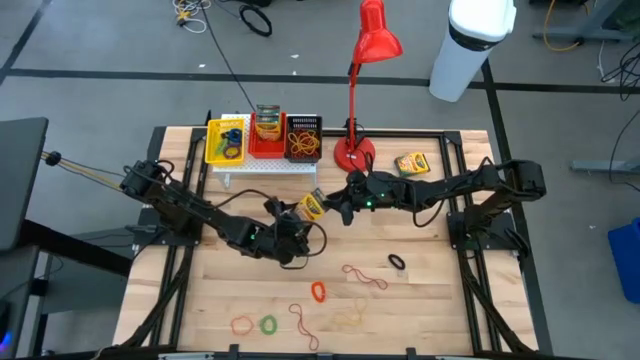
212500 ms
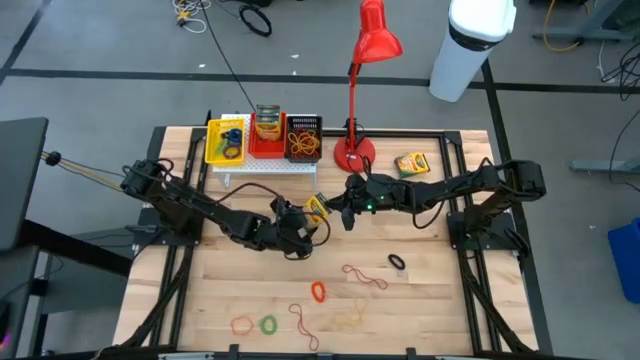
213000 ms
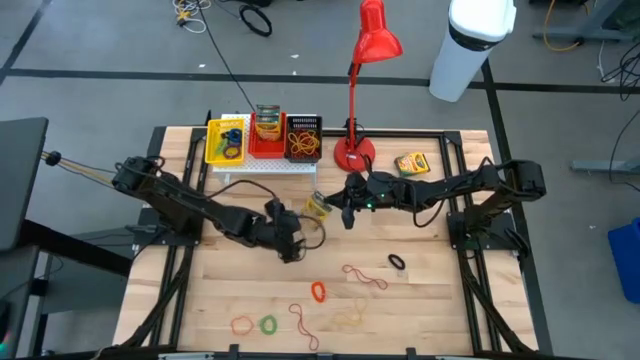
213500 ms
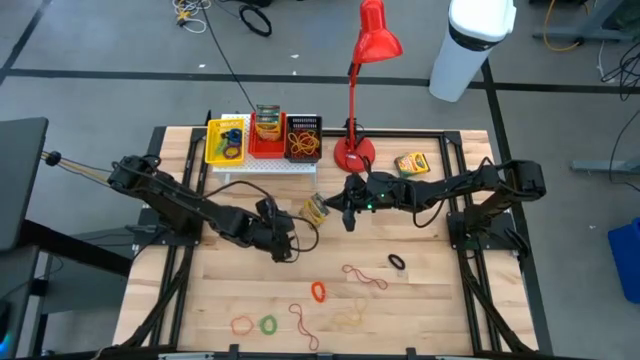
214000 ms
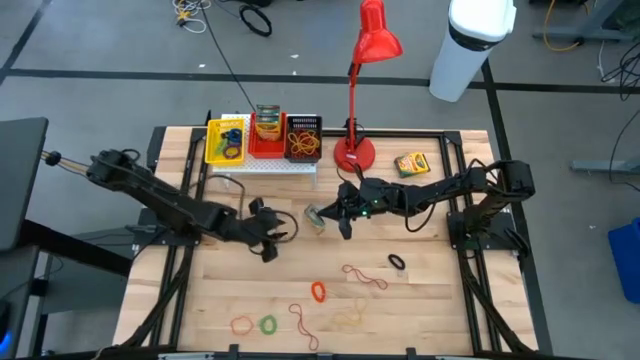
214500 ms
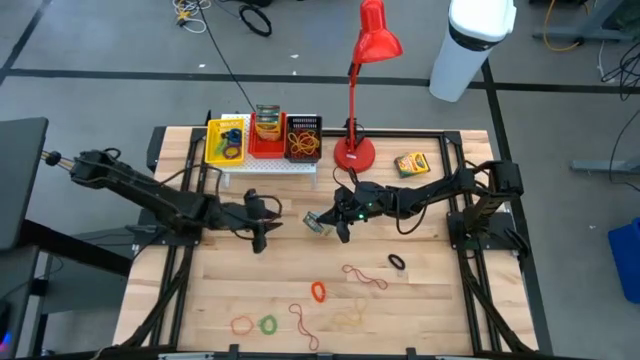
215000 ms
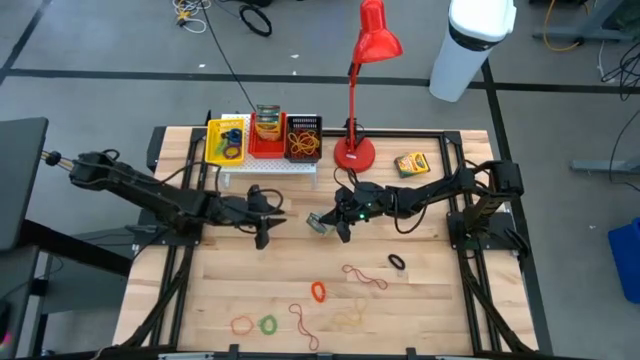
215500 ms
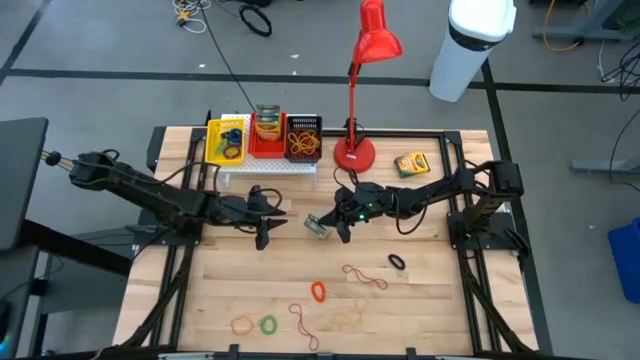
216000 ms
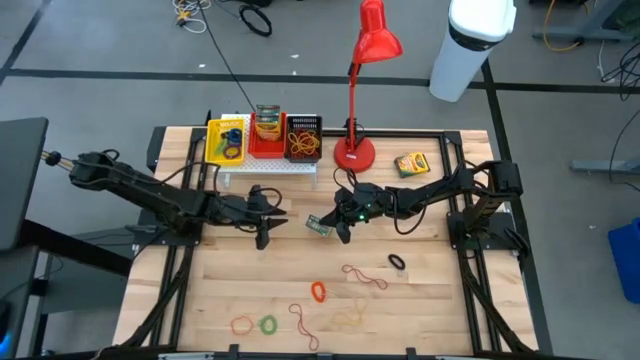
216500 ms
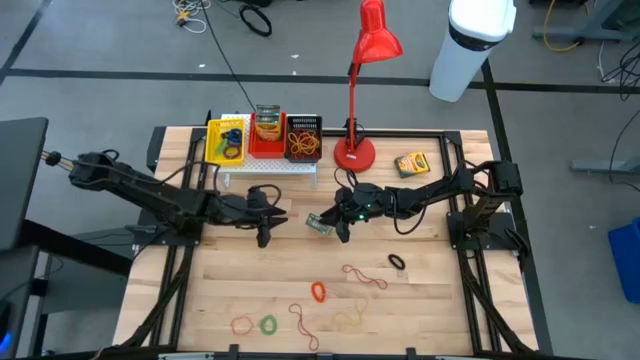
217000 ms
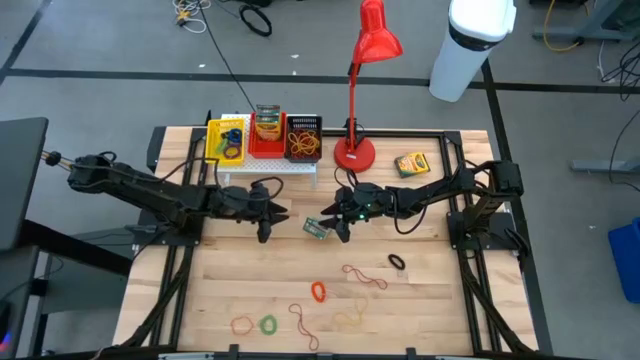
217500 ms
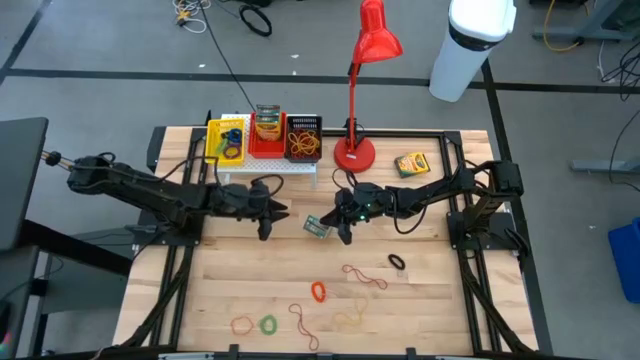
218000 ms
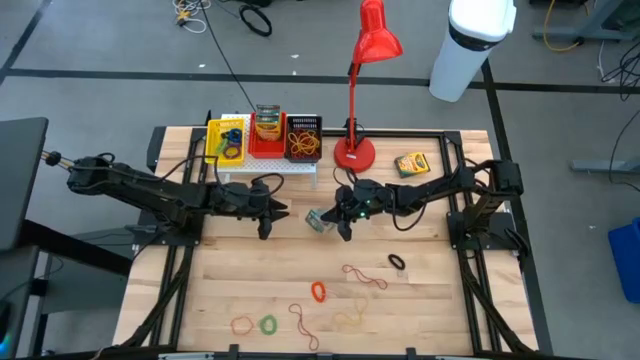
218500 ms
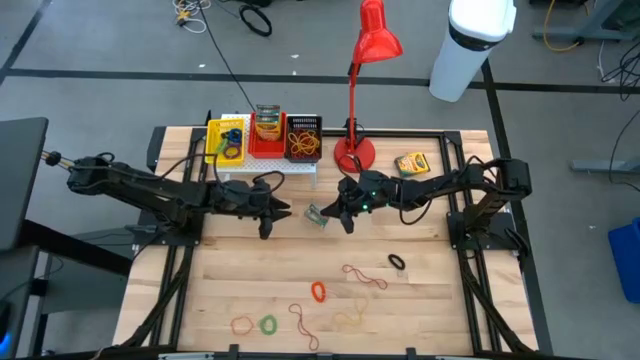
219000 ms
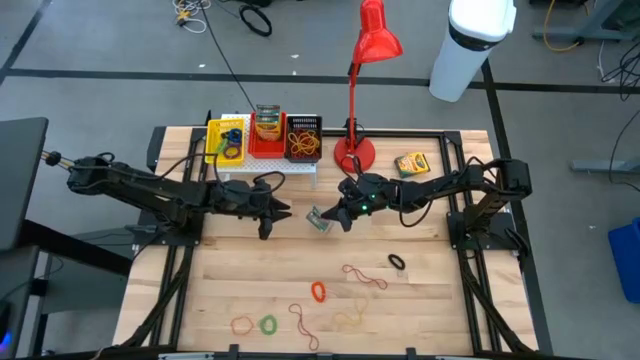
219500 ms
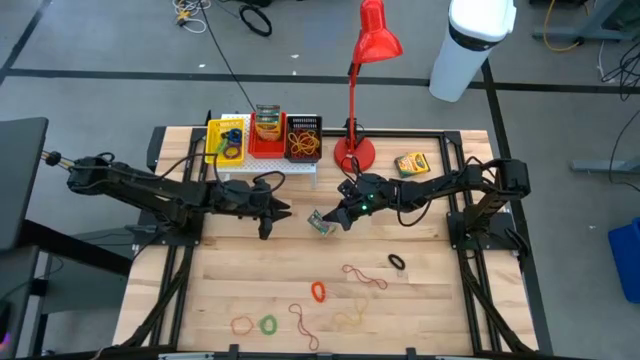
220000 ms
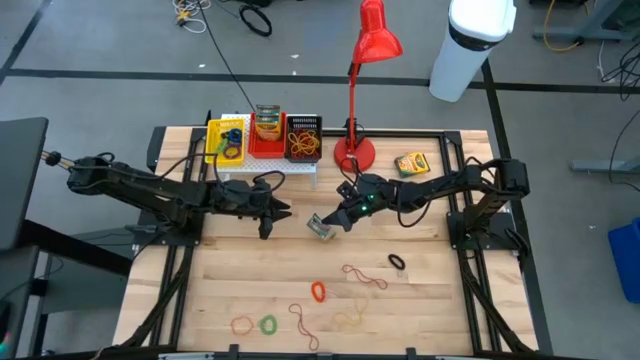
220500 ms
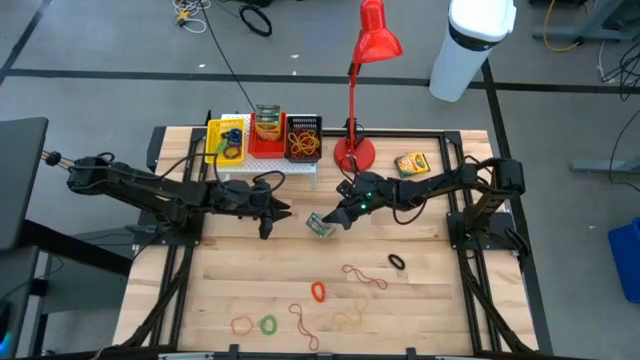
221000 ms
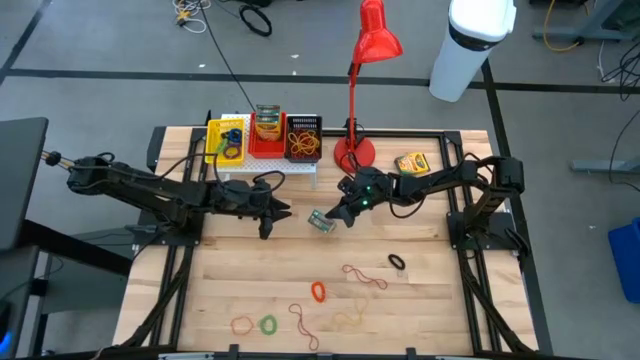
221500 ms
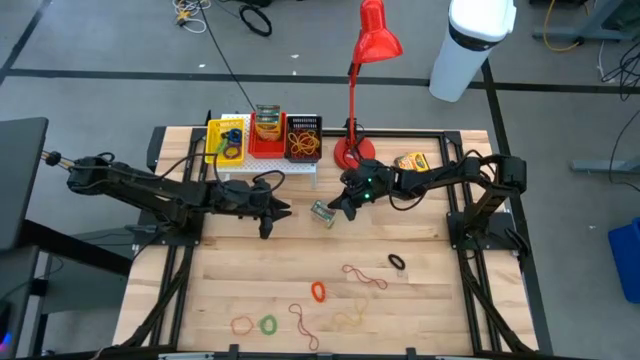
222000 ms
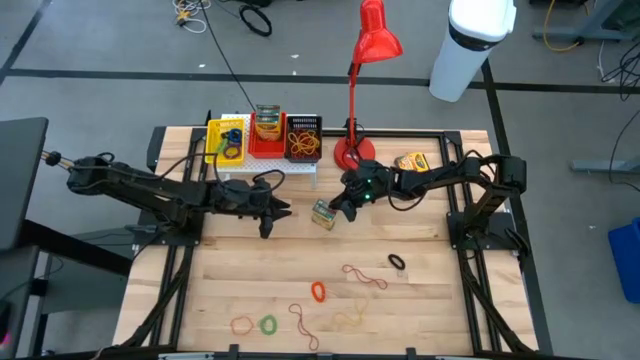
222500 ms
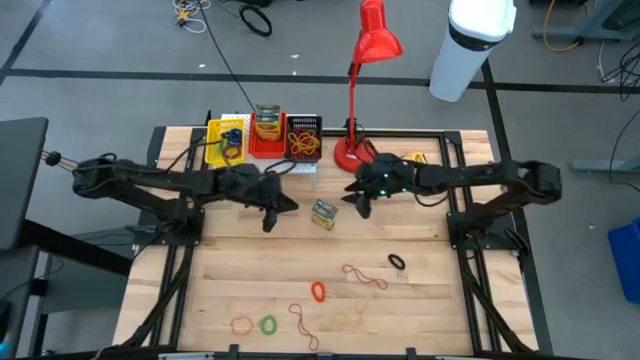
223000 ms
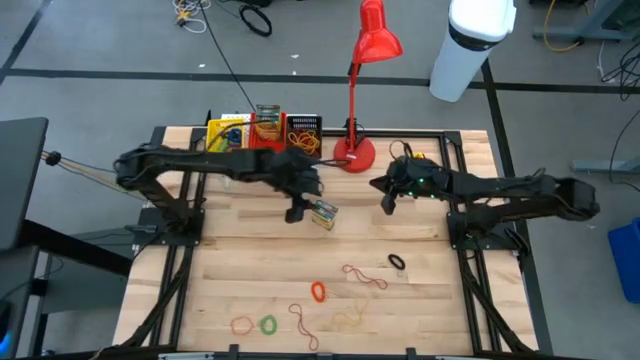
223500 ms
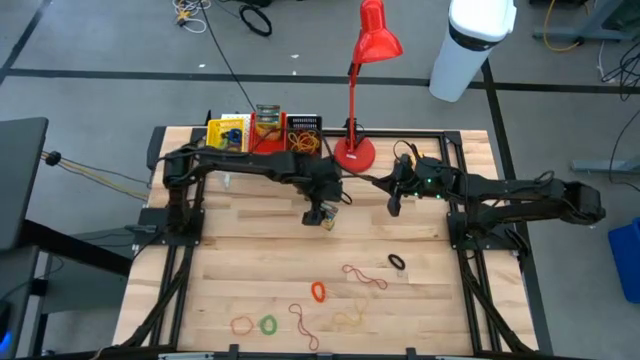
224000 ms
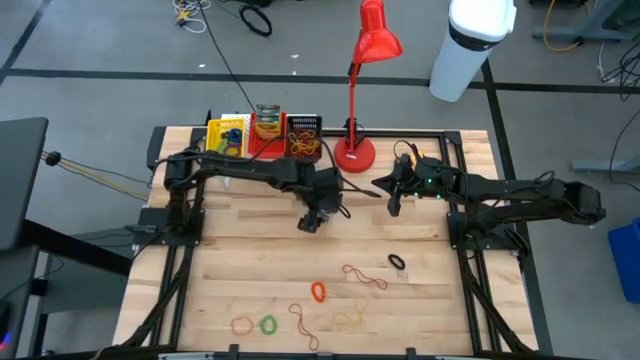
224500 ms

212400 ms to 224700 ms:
Task: Pick & Place Office Desk Supplies
Put the crayon box into the red bin on the shelf

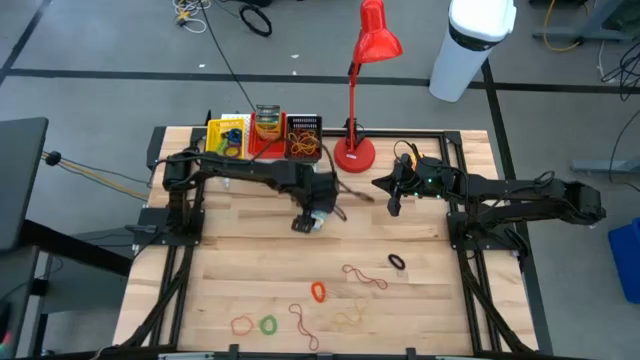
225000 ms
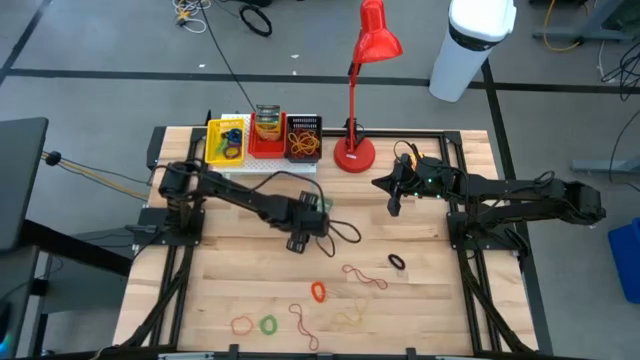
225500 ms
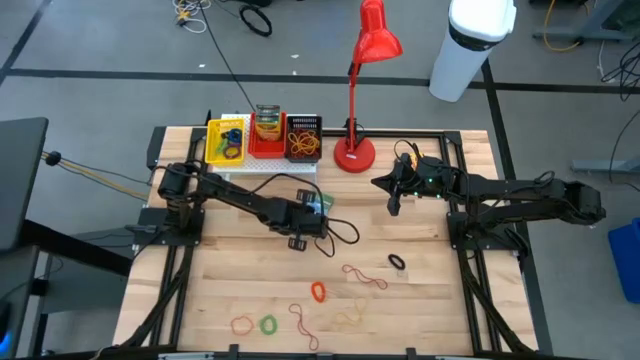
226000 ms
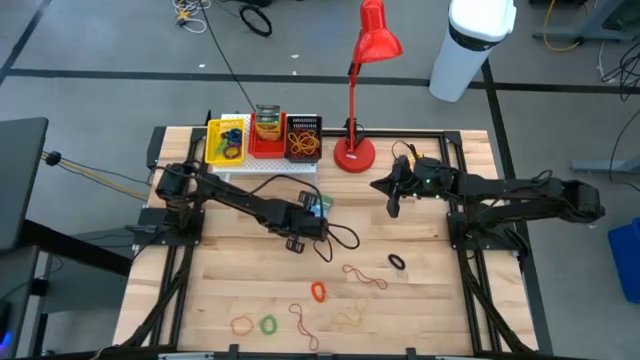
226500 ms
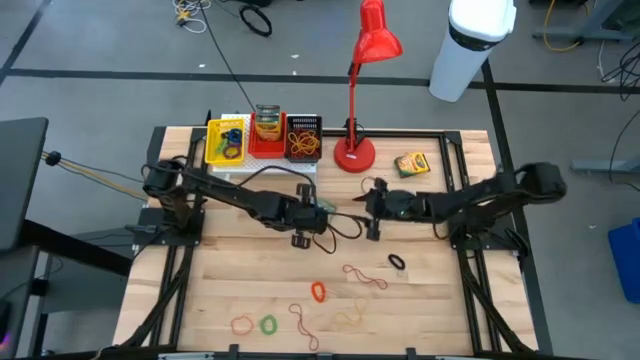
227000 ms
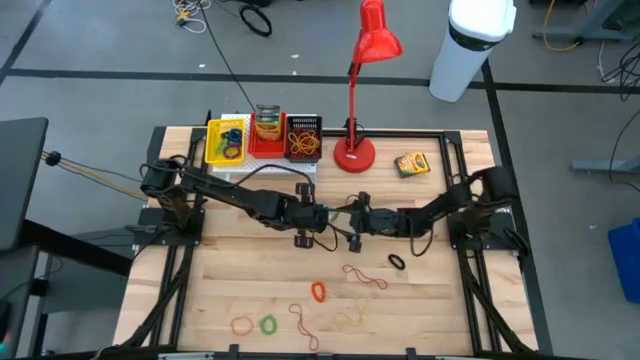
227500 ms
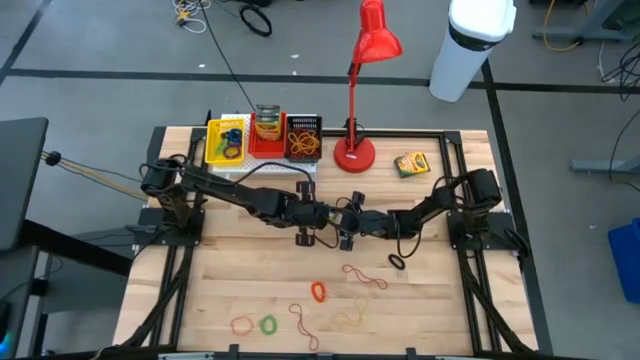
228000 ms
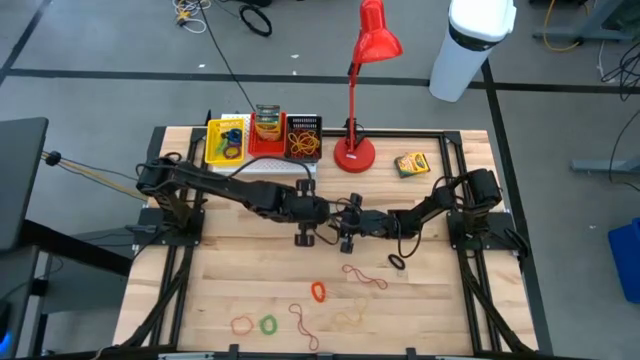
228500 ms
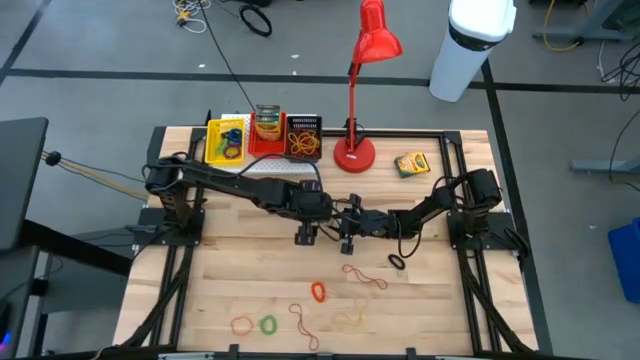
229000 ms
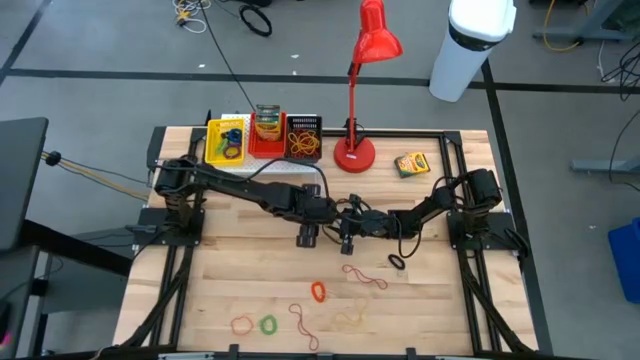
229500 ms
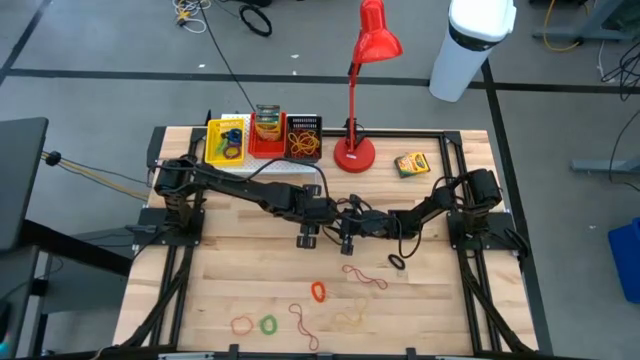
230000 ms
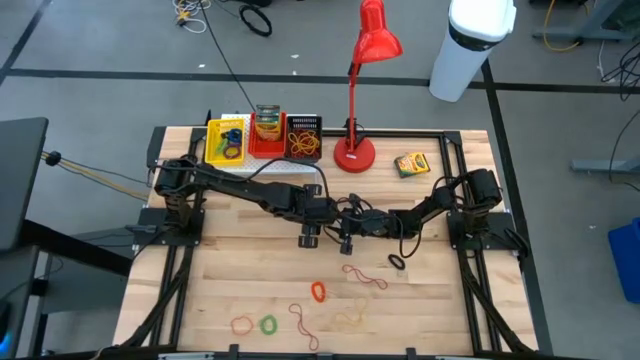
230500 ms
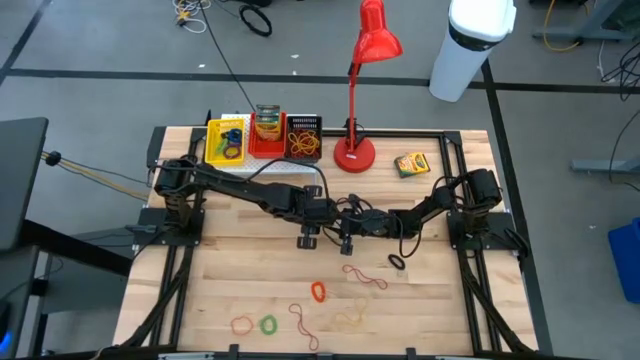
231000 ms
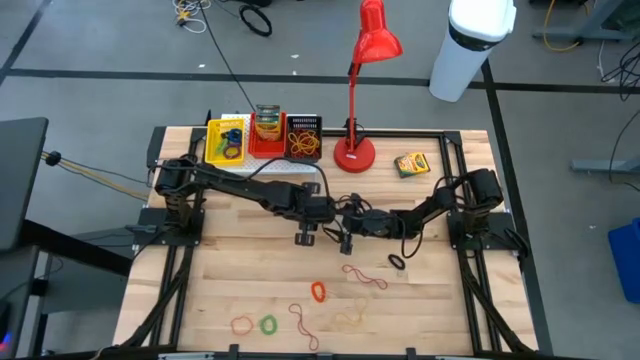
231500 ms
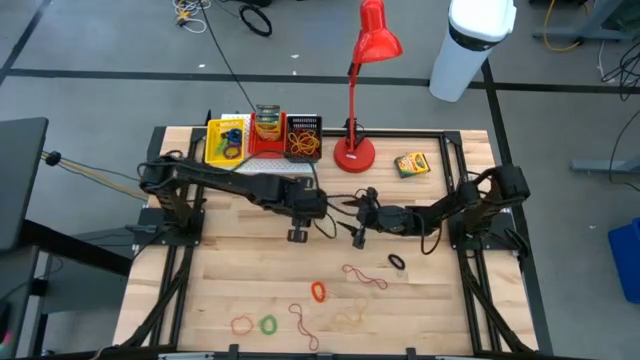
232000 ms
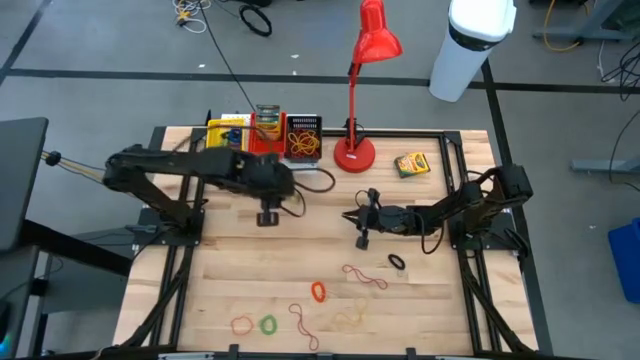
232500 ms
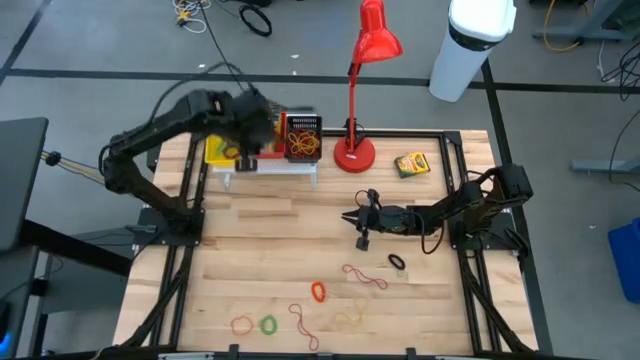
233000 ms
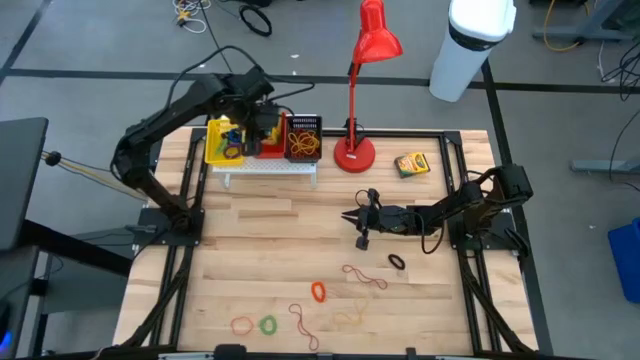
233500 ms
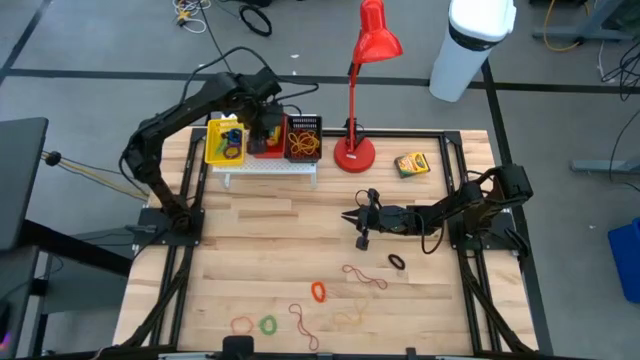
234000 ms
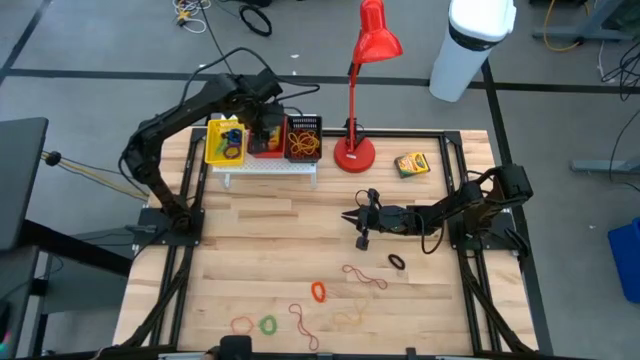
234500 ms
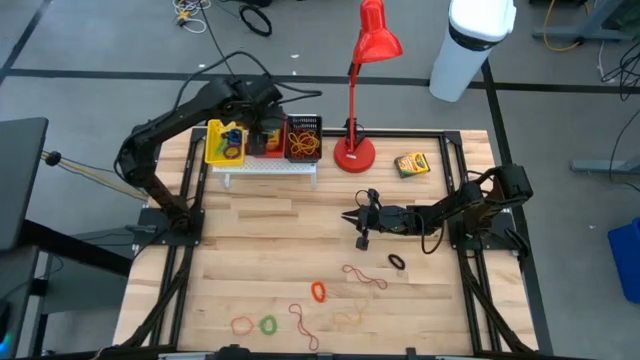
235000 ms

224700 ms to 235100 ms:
Put the crayon box into the red bin on the shelf
